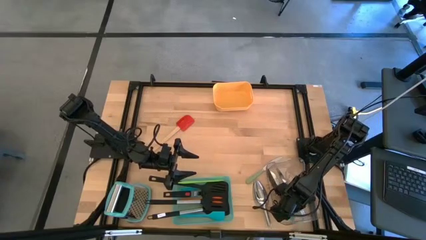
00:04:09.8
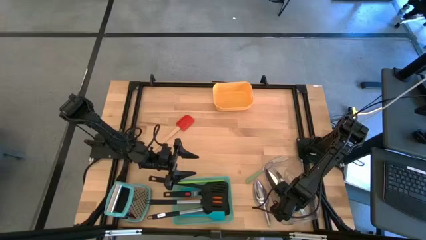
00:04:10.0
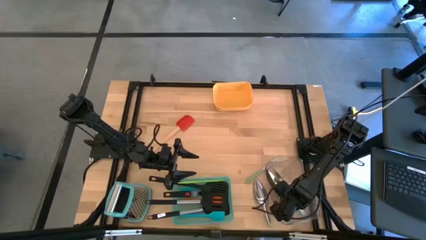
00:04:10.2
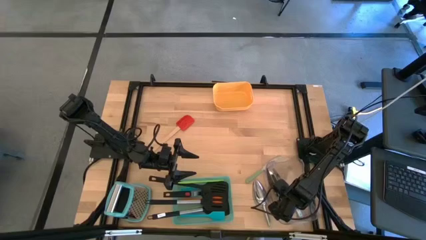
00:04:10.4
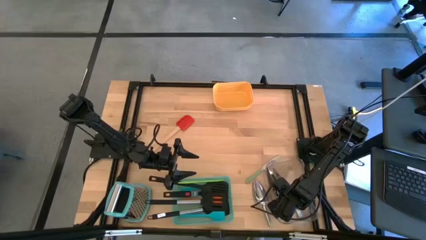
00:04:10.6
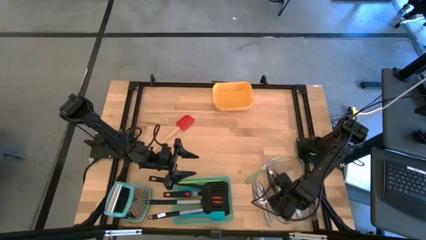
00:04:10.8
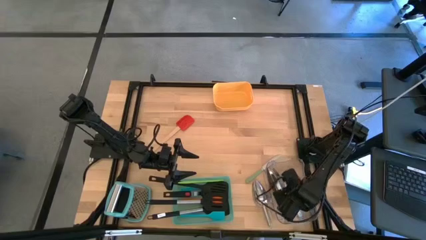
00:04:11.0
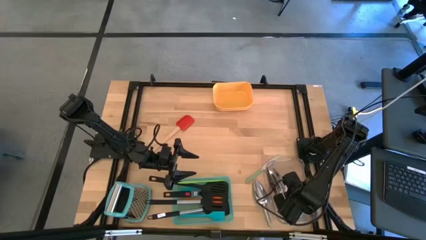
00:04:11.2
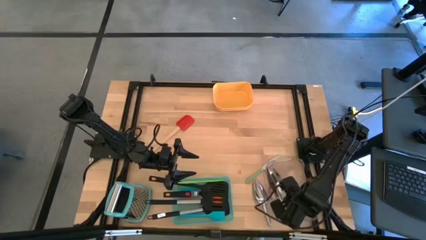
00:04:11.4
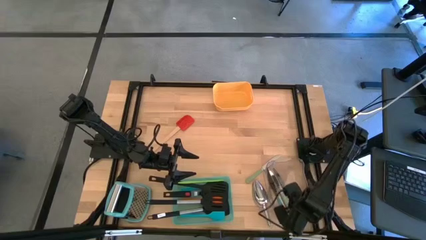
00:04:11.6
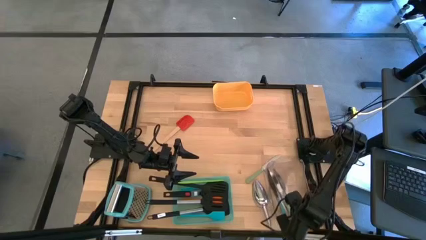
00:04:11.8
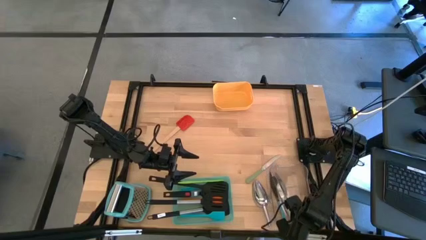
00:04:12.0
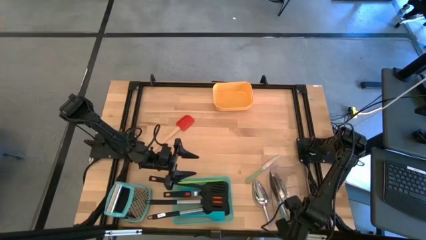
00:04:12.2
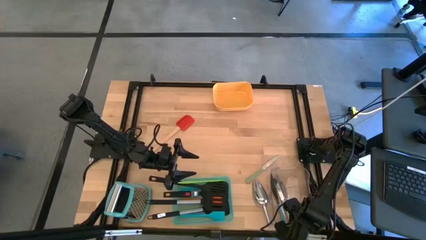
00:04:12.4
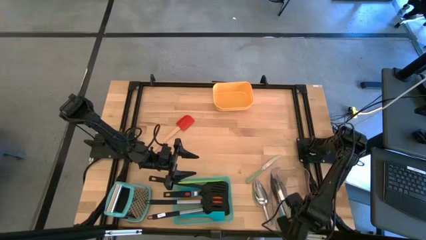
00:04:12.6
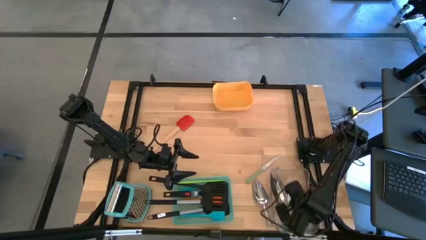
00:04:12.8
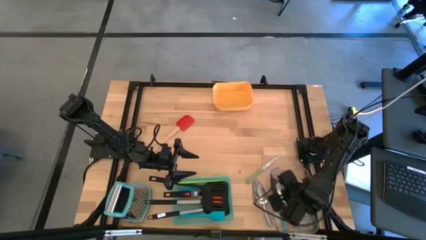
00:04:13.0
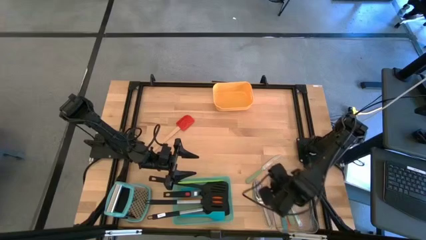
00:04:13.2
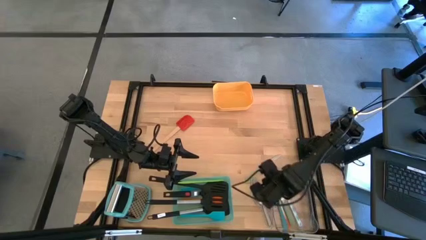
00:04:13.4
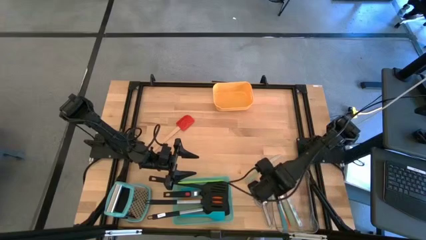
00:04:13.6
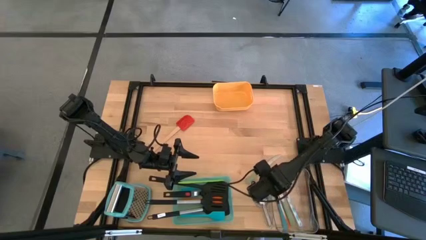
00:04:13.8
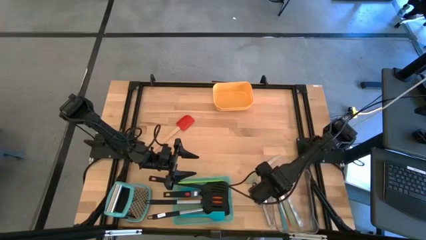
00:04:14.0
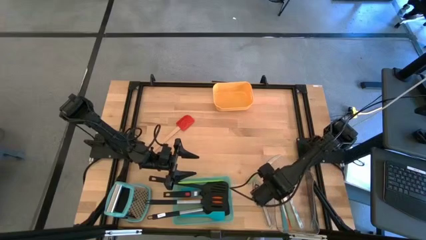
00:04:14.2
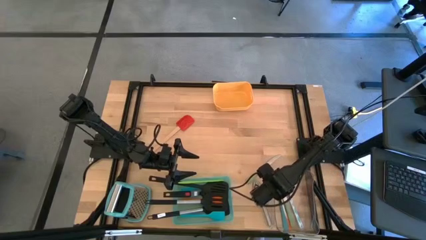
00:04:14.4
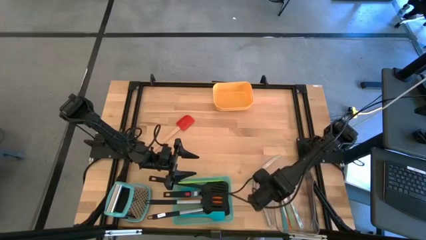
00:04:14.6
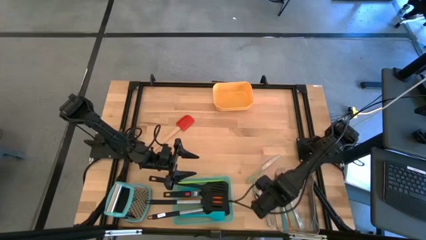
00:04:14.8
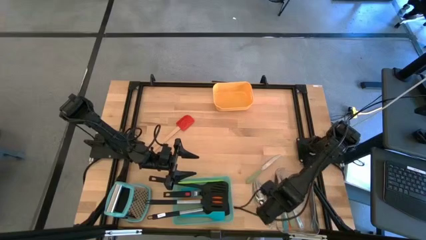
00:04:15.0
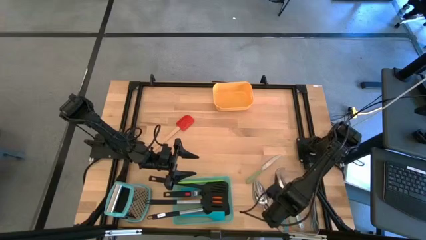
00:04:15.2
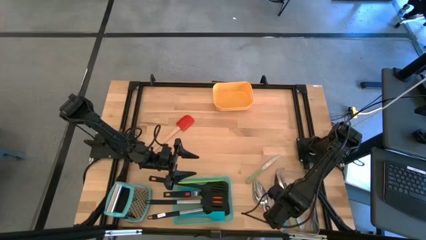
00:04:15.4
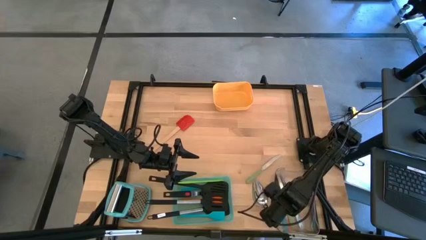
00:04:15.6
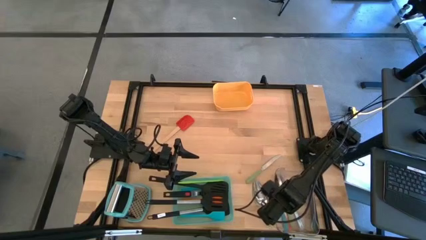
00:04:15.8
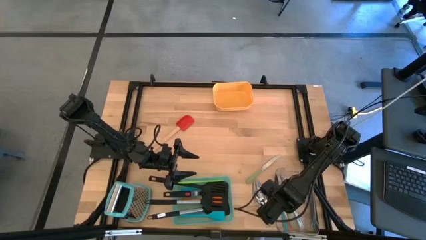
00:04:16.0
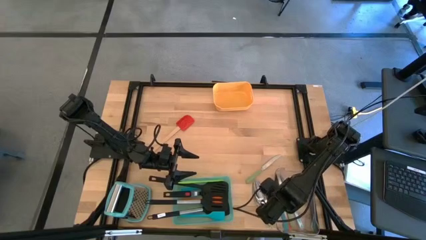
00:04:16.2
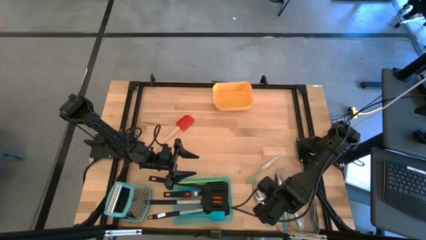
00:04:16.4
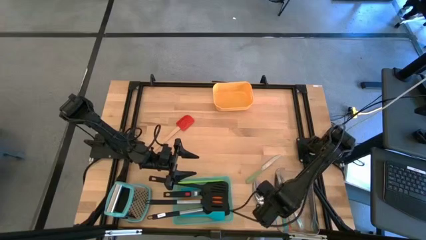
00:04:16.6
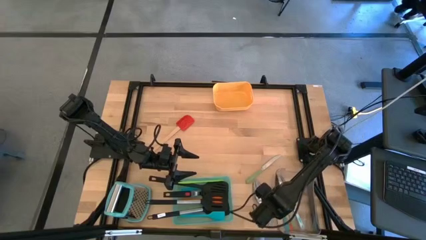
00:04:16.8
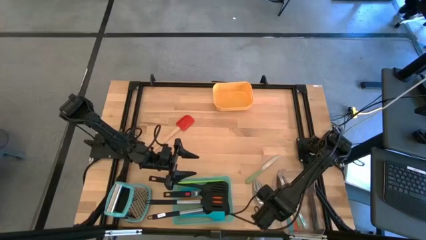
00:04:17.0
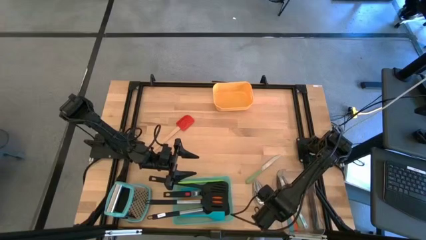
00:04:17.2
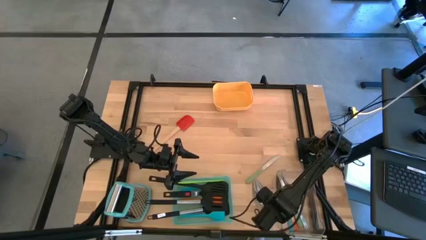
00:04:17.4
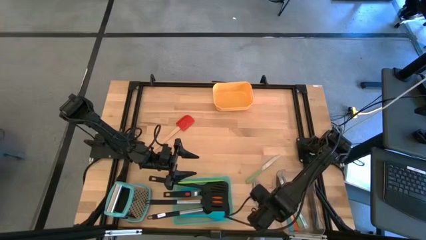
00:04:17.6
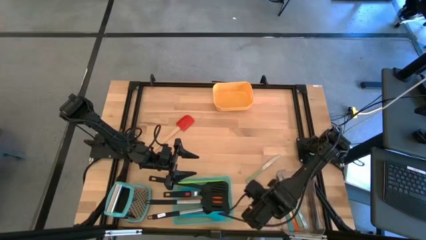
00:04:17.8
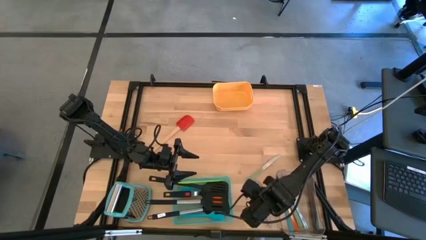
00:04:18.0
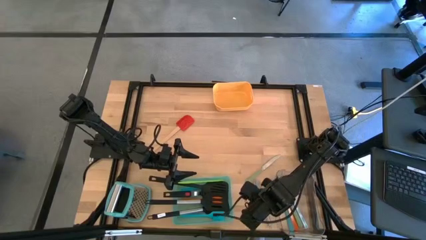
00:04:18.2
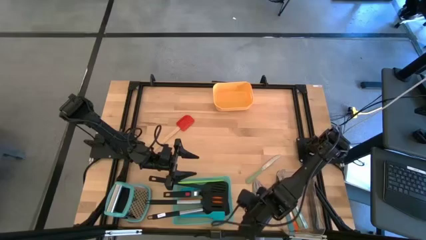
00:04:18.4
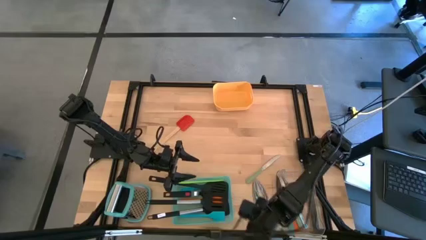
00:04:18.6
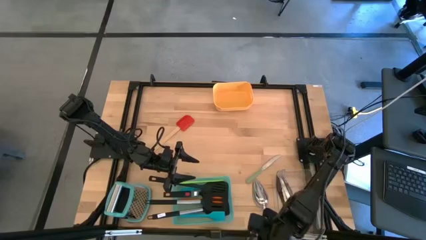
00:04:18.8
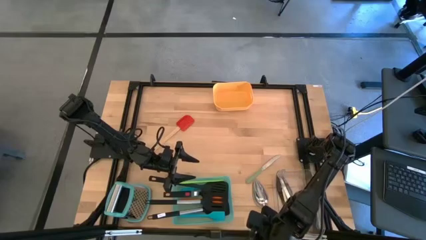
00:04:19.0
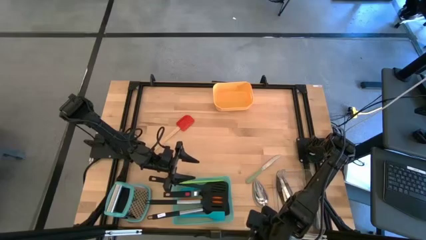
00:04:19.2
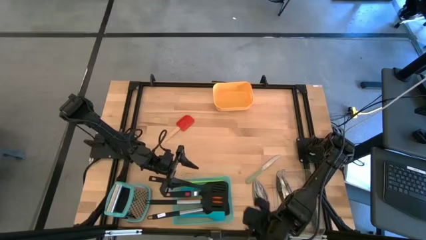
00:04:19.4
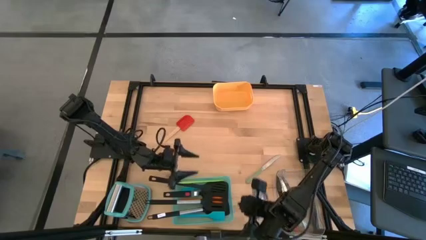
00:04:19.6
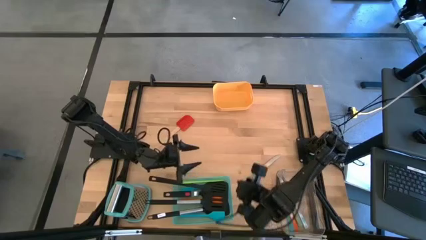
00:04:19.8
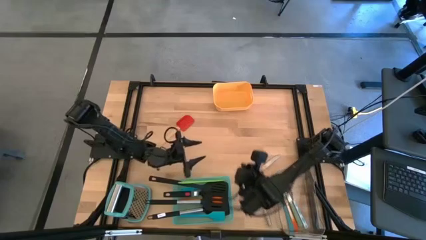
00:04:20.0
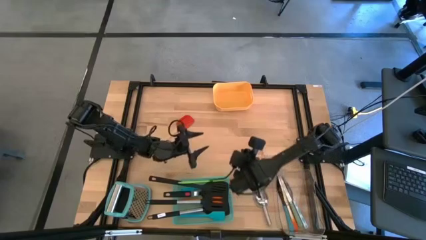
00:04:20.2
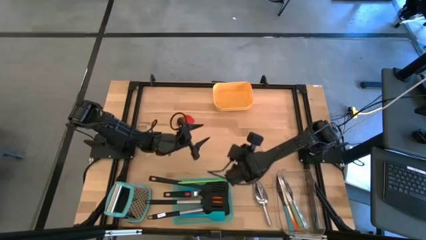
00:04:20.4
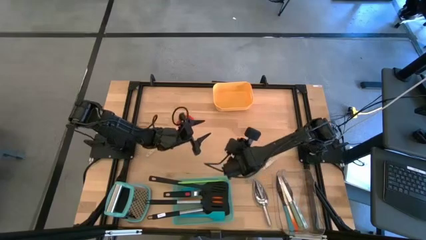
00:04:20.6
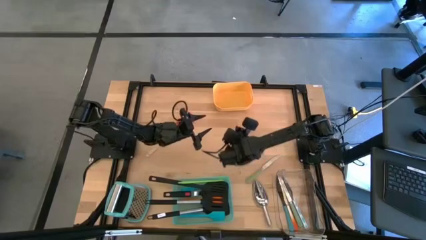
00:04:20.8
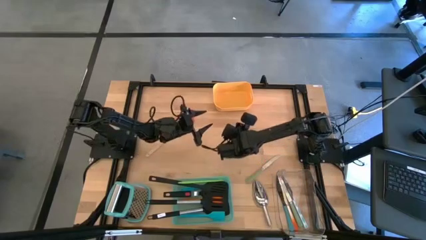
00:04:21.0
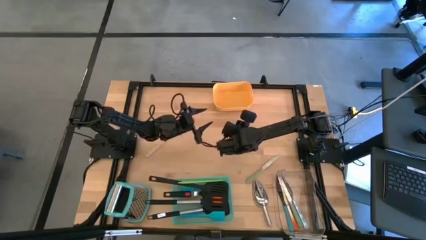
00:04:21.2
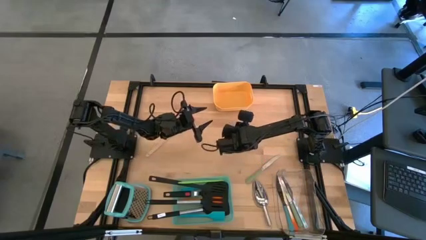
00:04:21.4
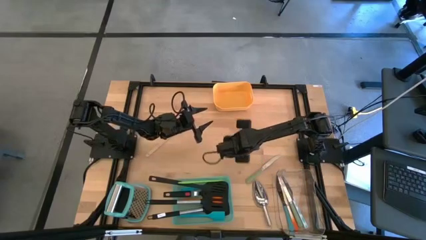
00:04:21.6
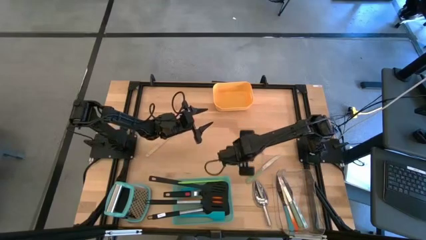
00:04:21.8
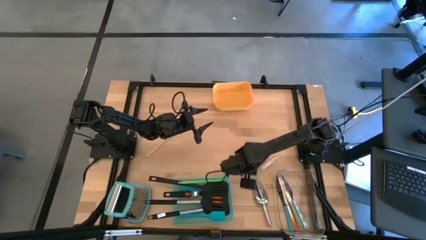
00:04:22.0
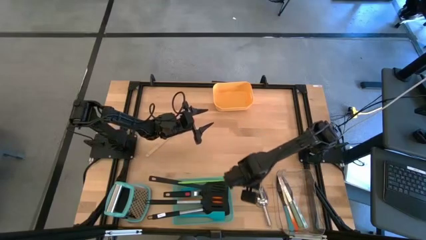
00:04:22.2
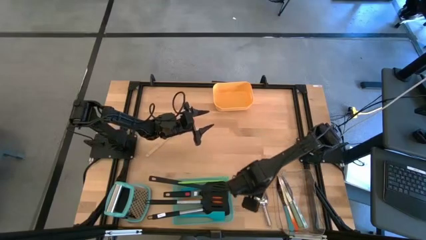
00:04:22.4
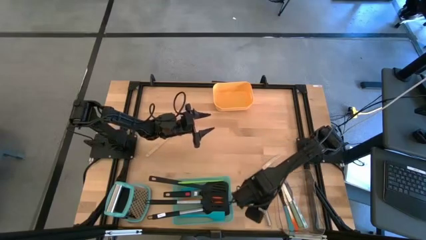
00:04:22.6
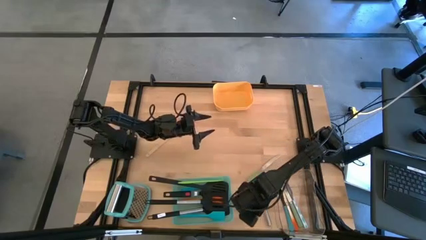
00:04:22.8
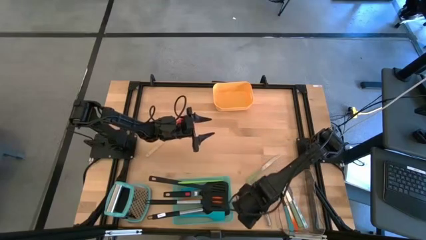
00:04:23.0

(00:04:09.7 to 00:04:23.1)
Task: Pick & Place Kitchen Items
Put the ice scoop into the yellow bin
